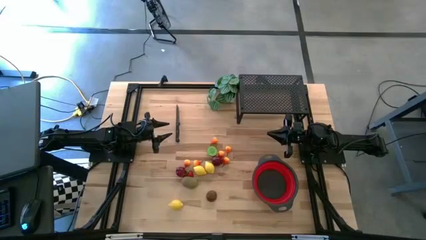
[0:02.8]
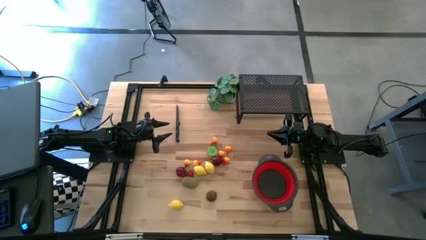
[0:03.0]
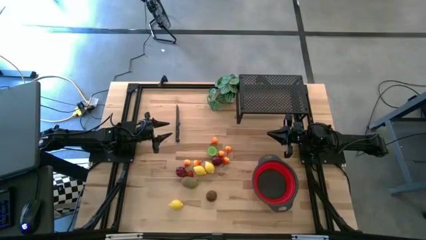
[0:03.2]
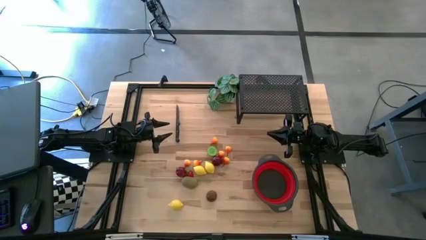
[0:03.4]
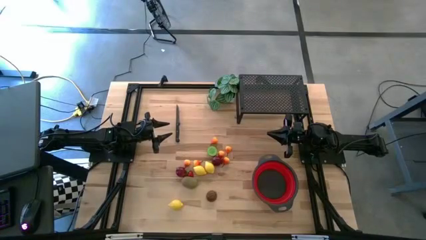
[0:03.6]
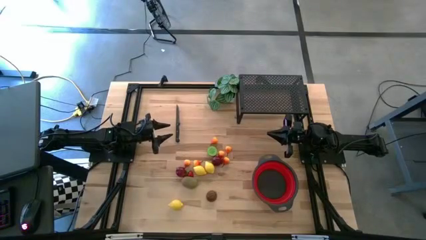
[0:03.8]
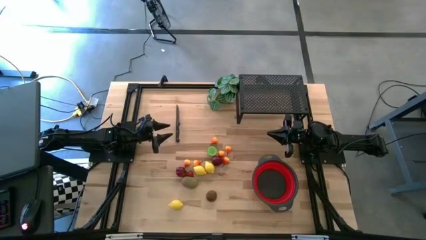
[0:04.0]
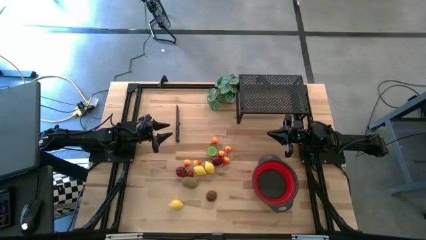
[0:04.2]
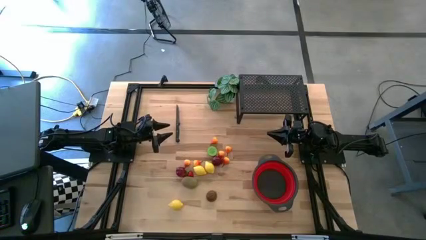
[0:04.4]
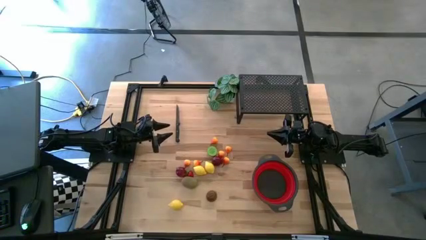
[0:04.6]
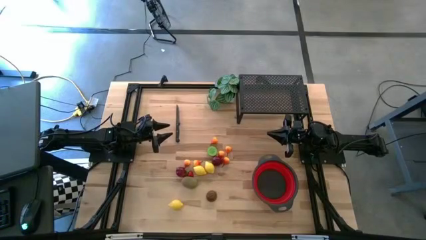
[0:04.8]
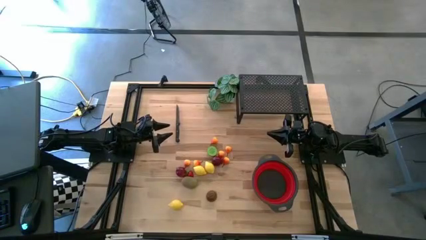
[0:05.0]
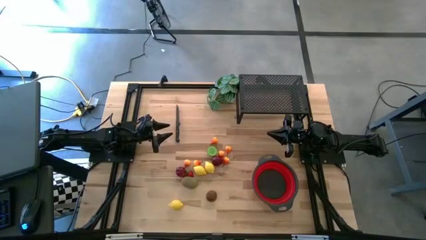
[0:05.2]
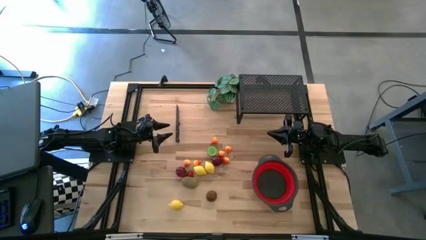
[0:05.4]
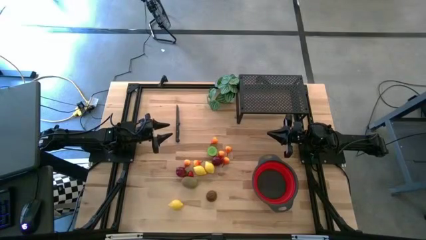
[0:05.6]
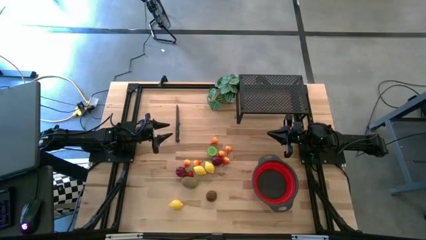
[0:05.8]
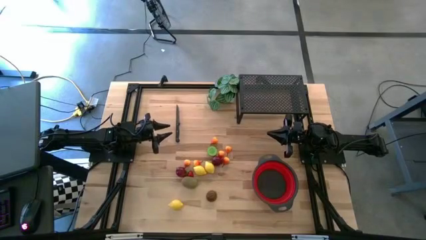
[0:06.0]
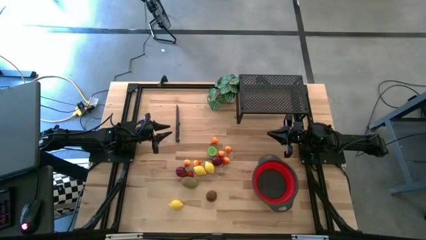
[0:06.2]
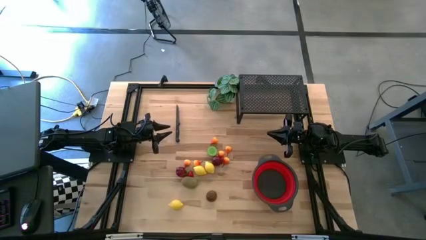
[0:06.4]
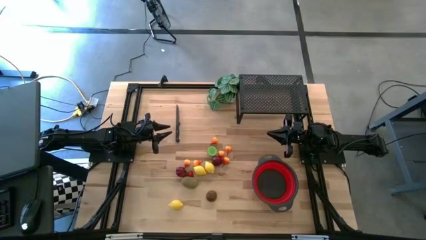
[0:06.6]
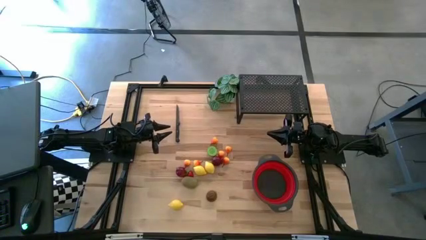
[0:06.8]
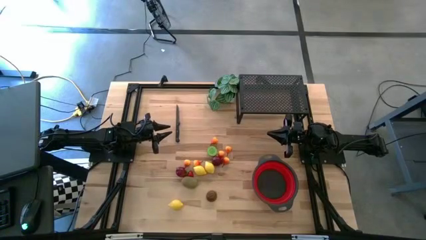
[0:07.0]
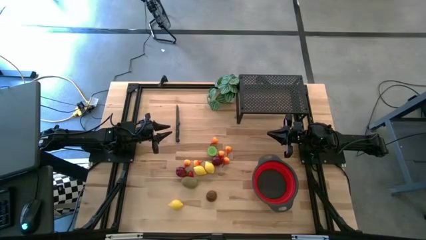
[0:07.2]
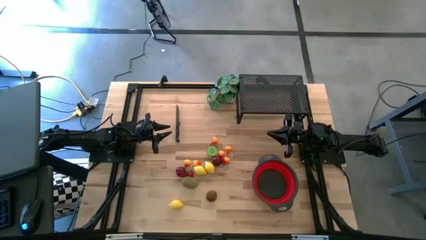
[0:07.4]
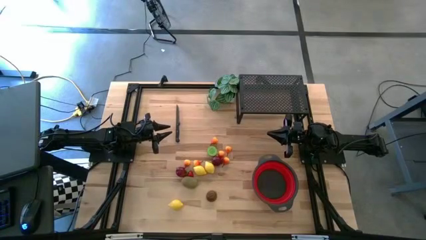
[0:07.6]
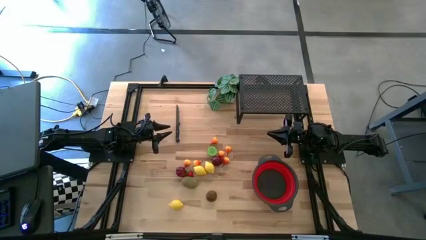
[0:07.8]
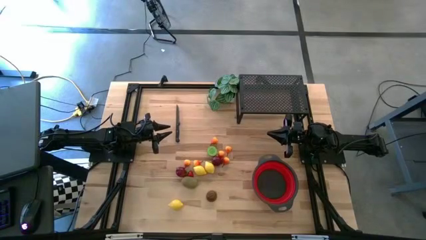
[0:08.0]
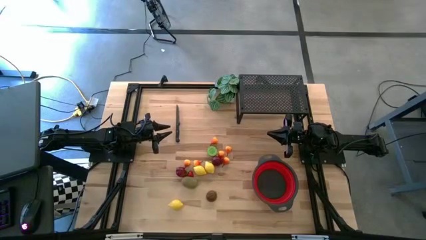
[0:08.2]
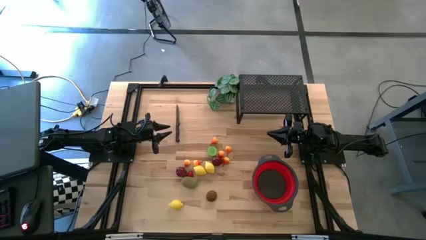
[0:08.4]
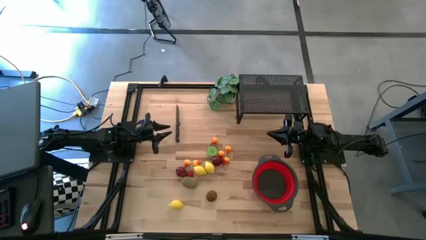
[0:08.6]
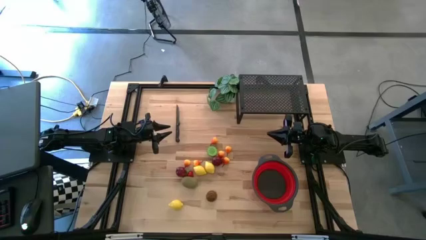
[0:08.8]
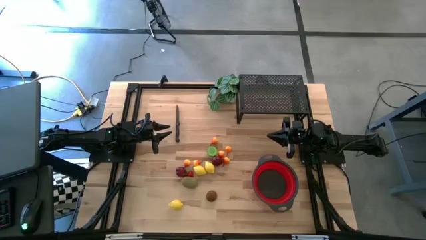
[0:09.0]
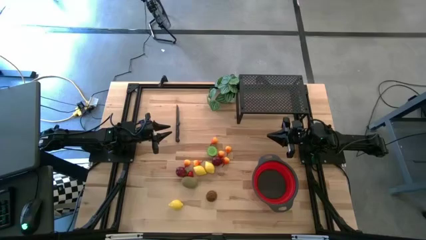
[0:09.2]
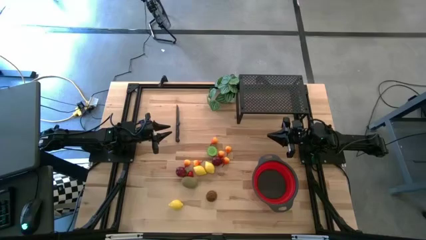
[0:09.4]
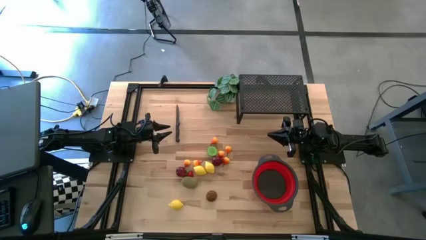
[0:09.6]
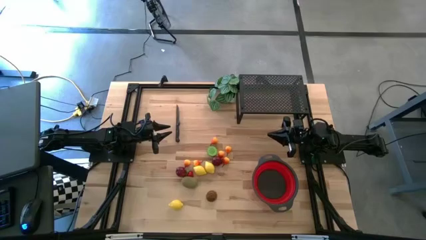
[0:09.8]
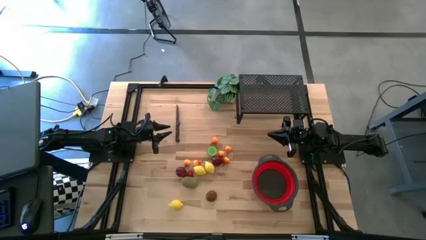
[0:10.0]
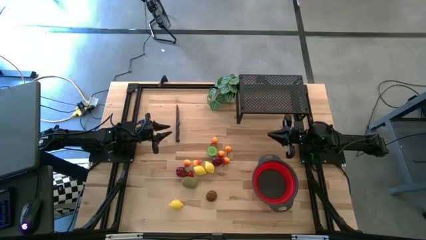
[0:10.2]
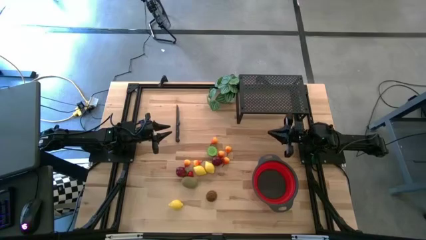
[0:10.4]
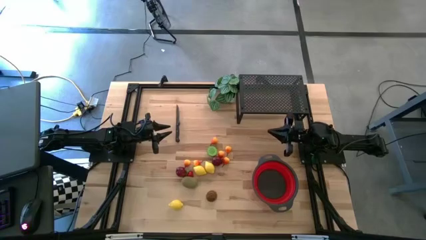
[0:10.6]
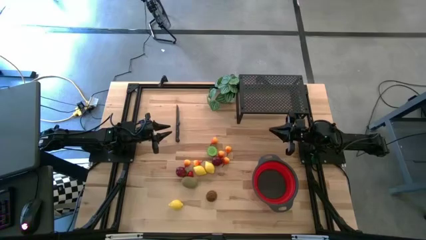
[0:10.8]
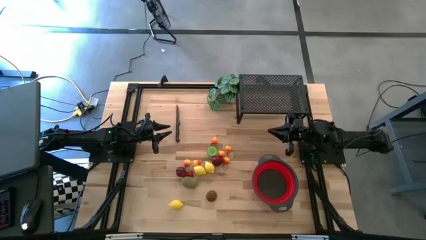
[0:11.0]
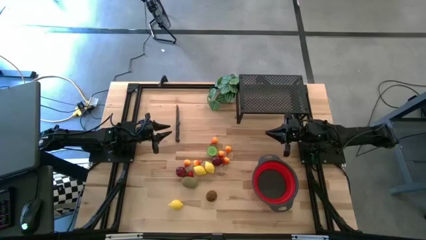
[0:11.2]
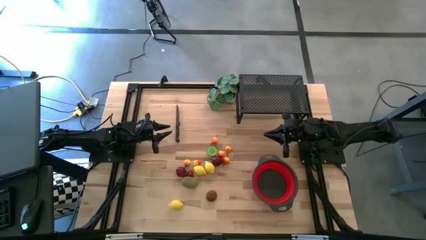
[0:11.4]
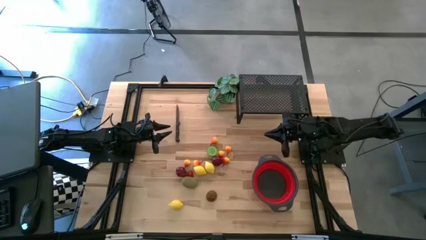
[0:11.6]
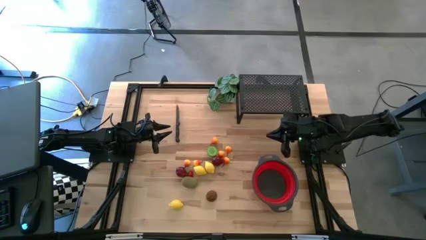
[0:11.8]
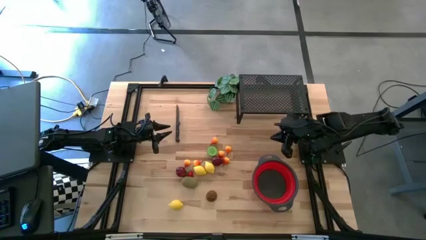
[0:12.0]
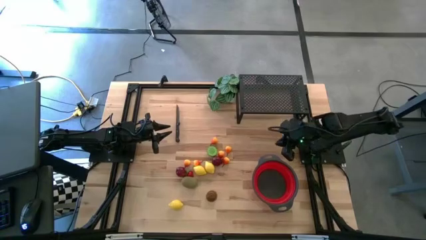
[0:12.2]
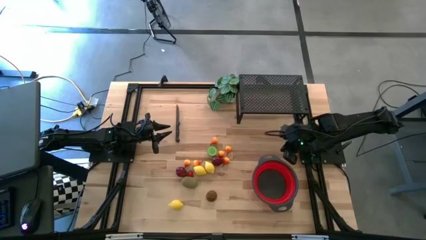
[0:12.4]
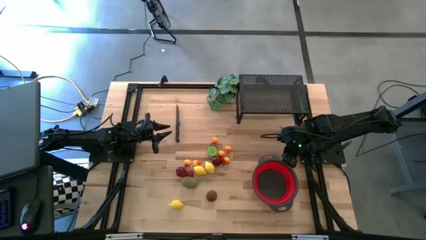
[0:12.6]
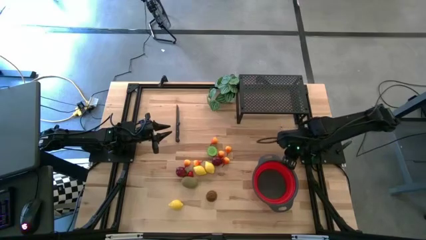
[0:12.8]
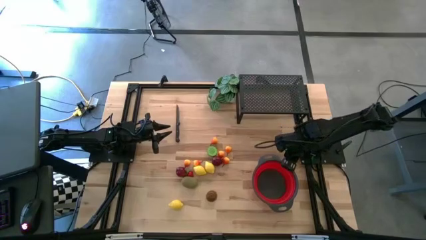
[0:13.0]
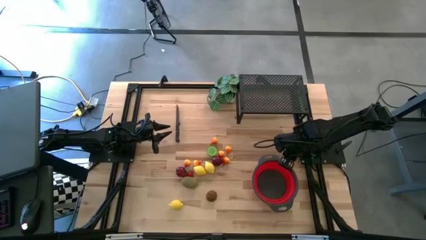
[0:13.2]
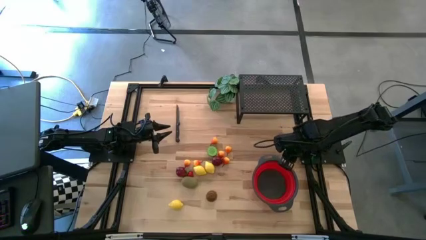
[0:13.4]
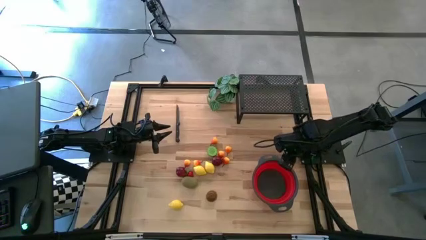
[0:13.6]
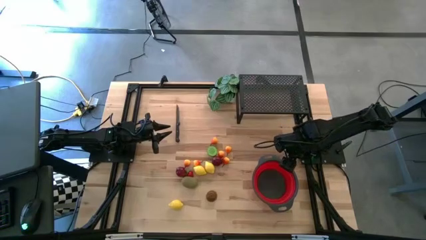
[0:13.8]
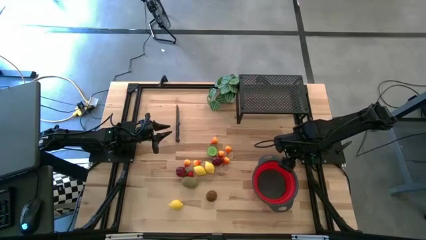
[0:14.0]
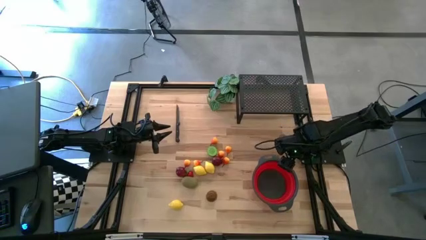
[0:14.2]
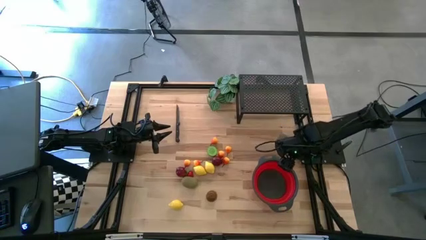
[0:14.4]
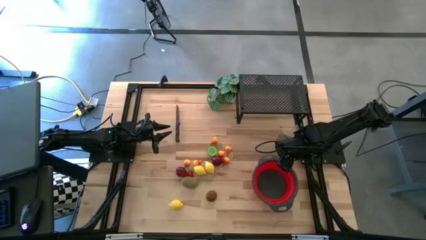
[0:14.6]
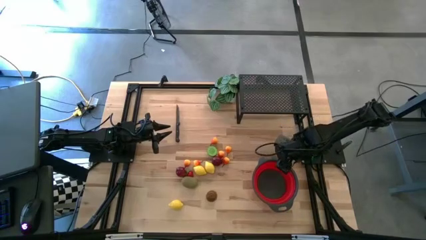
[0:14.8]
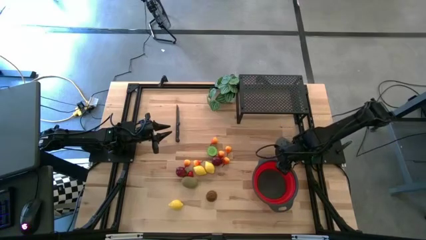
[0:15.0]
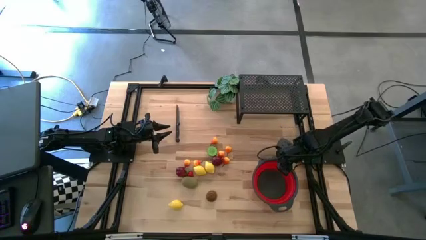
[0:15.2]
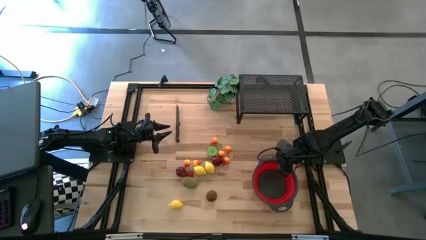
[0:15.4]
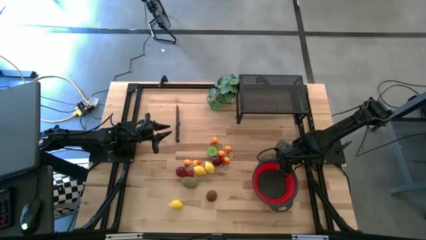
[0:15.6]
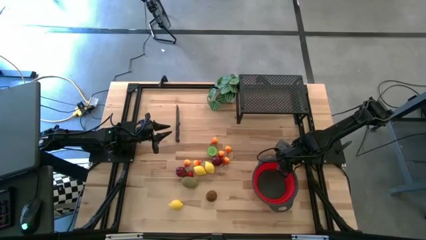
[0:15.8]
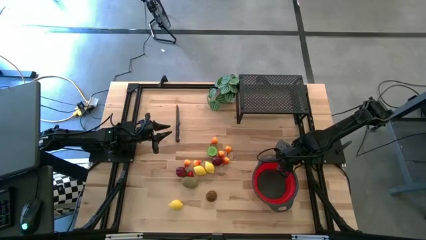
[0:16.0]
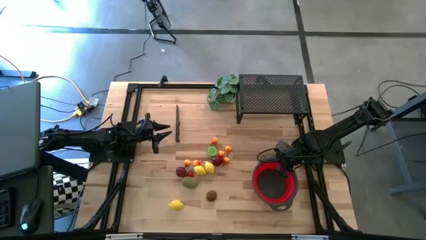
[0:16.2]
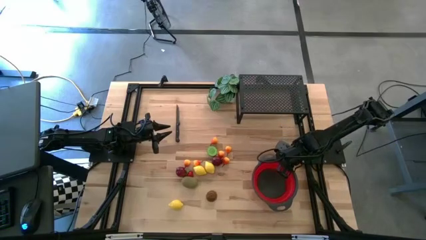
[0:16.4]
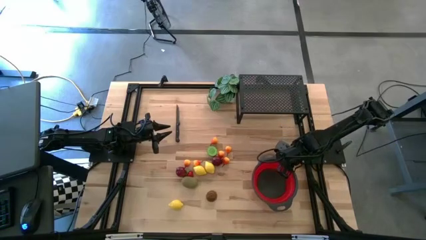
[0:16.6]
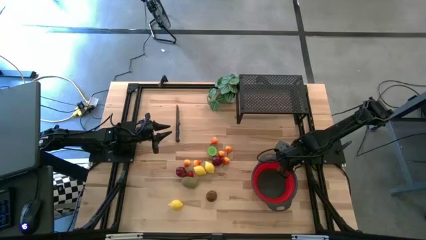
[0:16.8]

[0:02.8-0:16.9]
Task: Pick & Place Fruit
Put the red strainer bowl on the shelf
